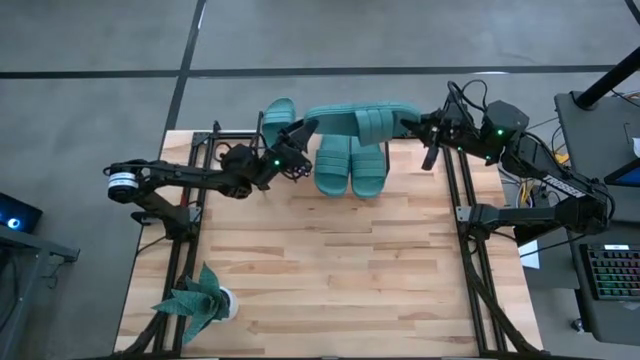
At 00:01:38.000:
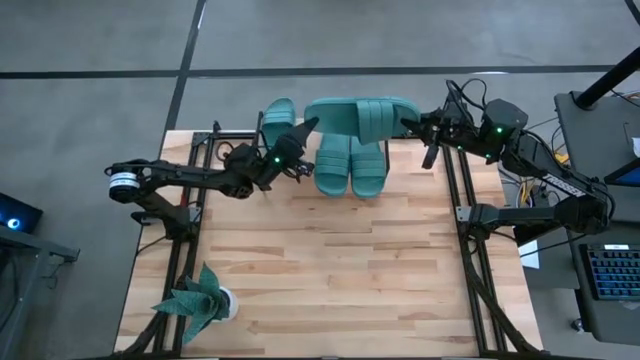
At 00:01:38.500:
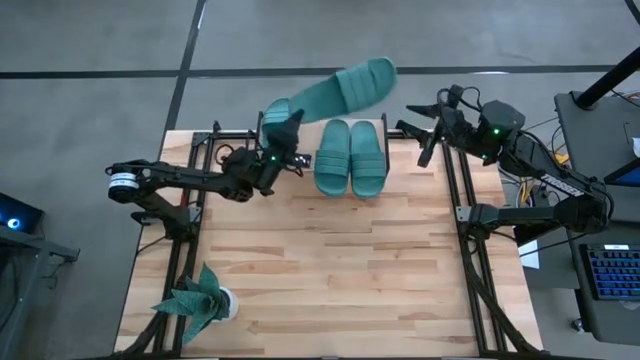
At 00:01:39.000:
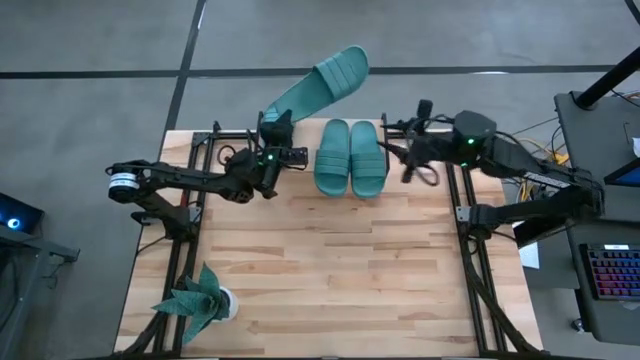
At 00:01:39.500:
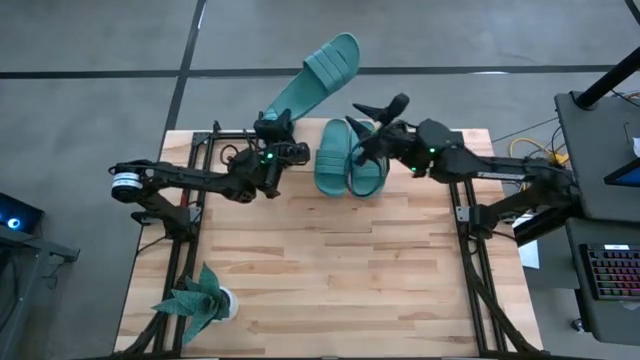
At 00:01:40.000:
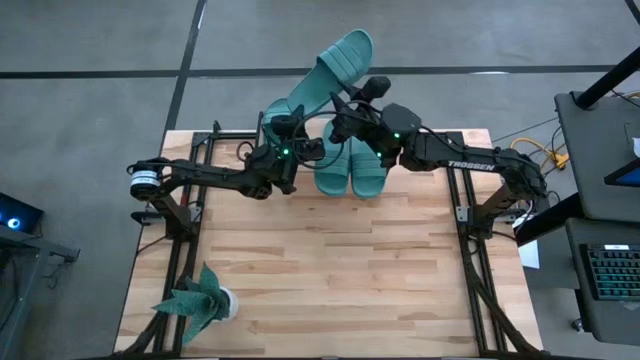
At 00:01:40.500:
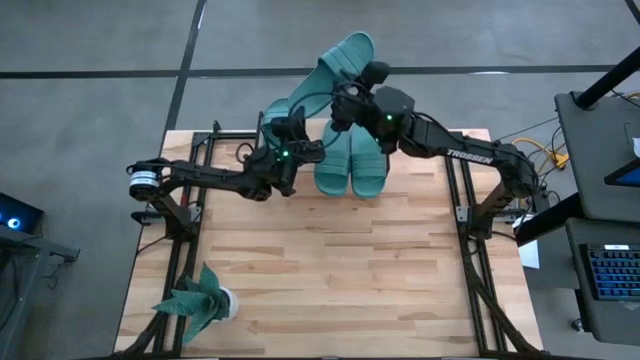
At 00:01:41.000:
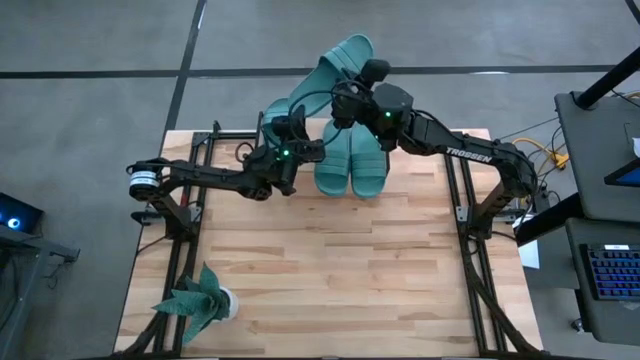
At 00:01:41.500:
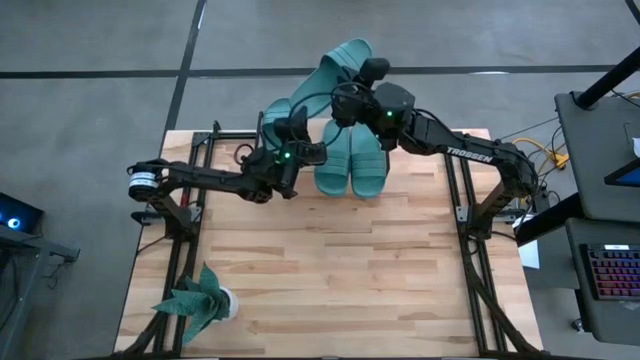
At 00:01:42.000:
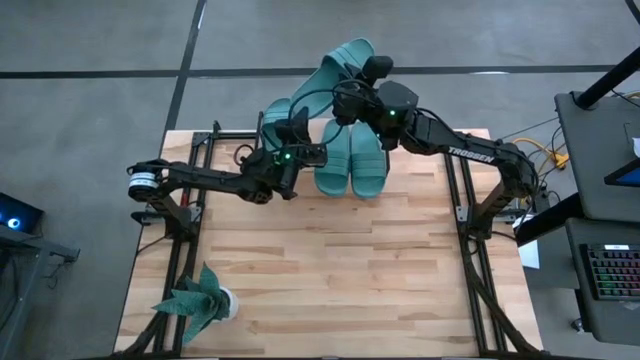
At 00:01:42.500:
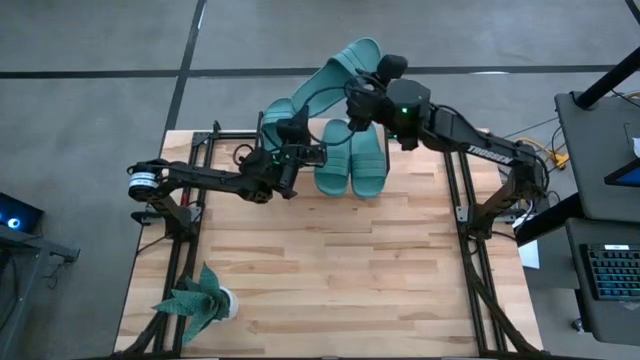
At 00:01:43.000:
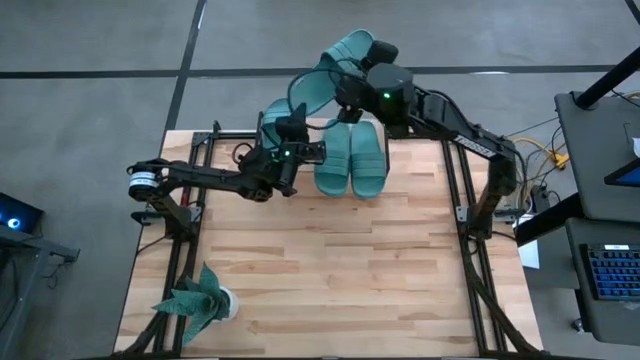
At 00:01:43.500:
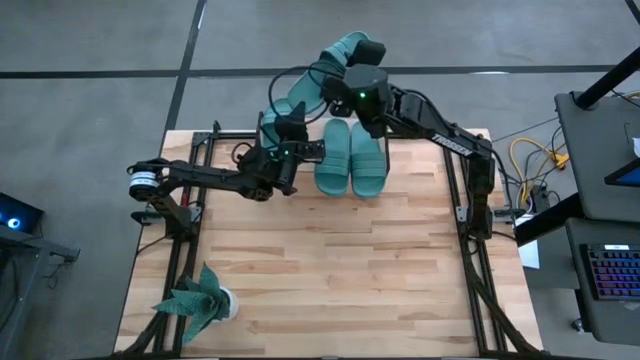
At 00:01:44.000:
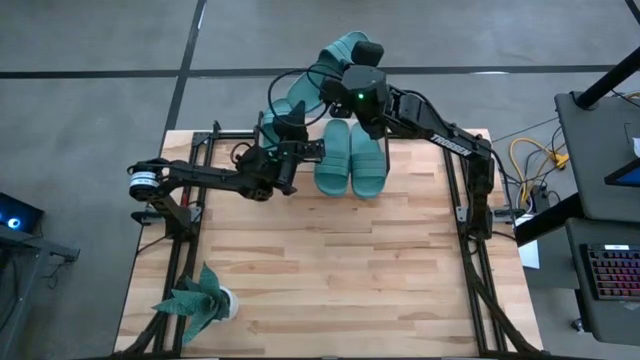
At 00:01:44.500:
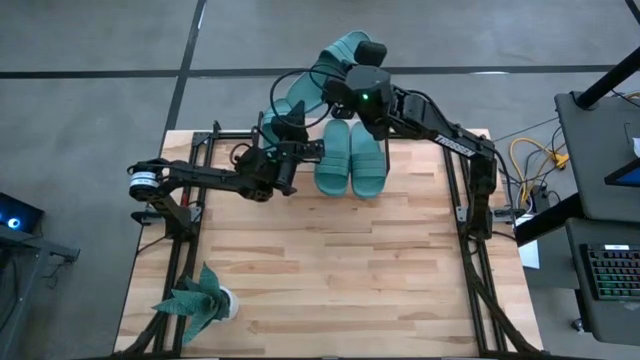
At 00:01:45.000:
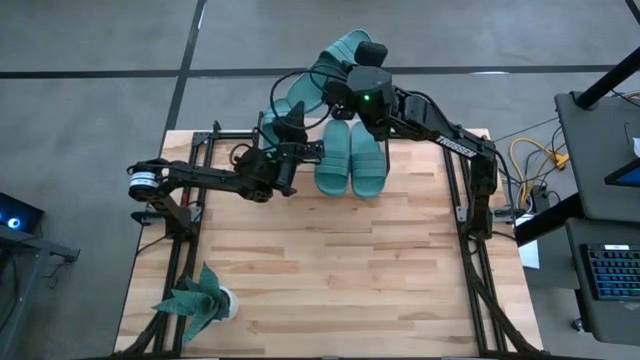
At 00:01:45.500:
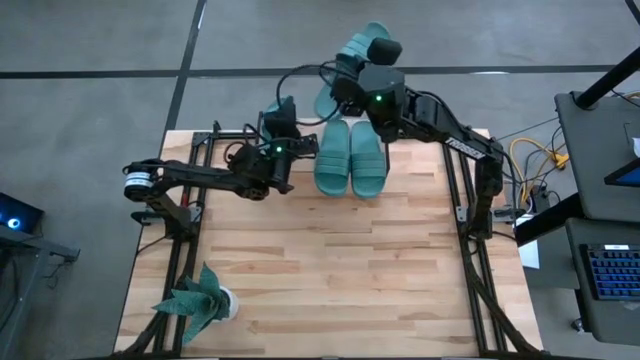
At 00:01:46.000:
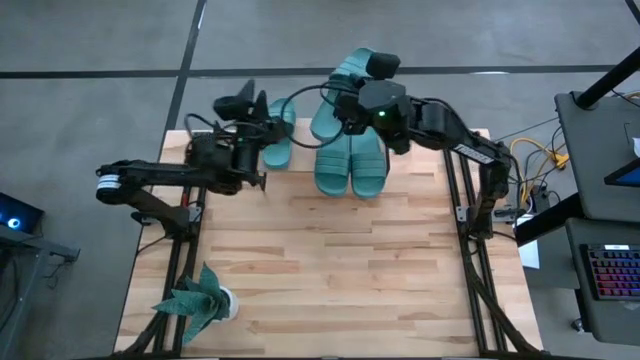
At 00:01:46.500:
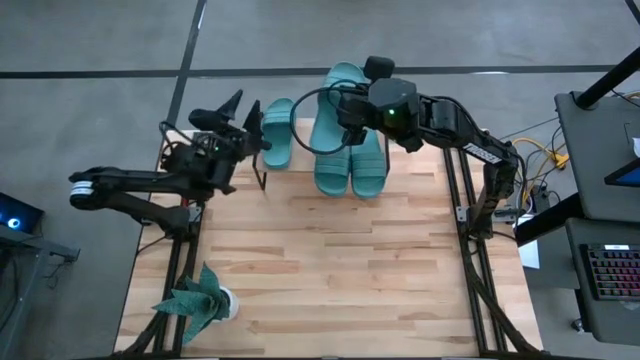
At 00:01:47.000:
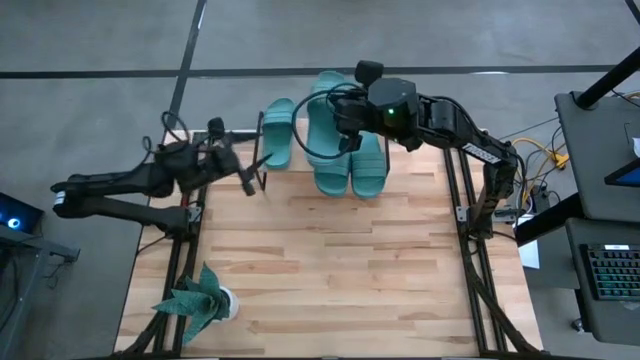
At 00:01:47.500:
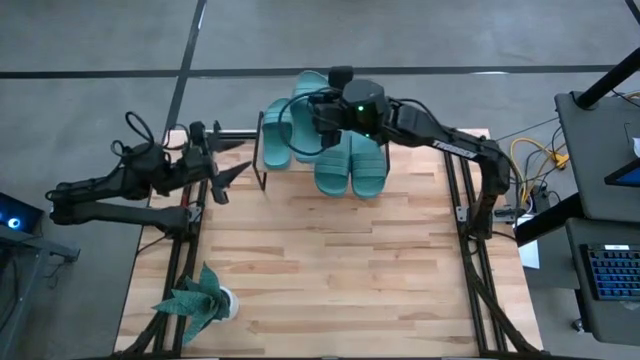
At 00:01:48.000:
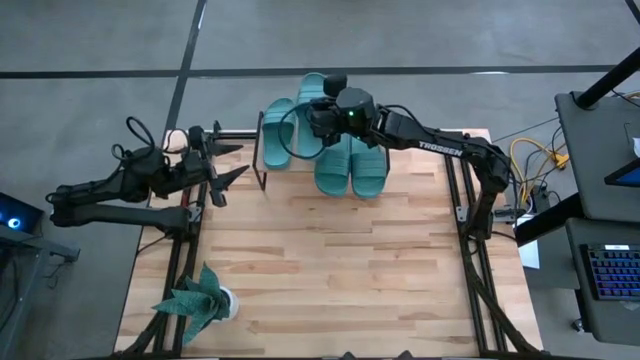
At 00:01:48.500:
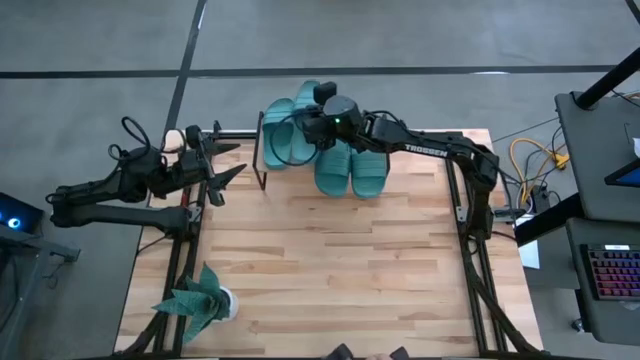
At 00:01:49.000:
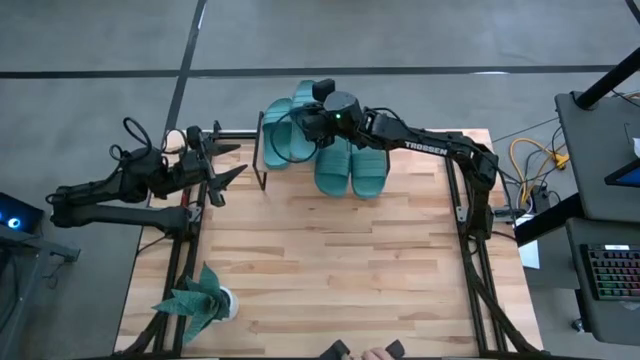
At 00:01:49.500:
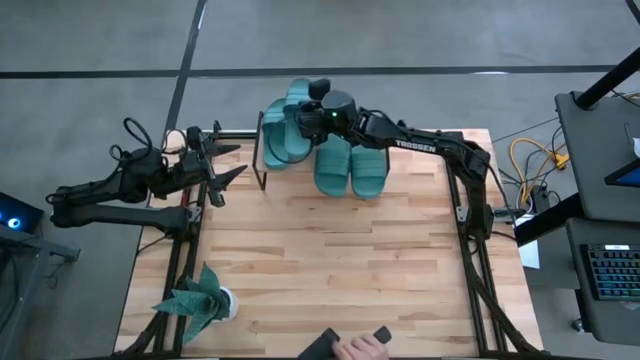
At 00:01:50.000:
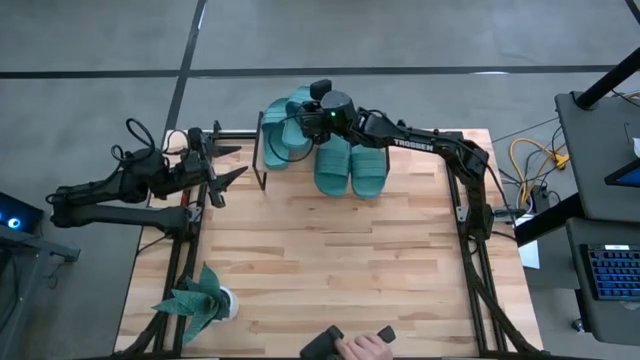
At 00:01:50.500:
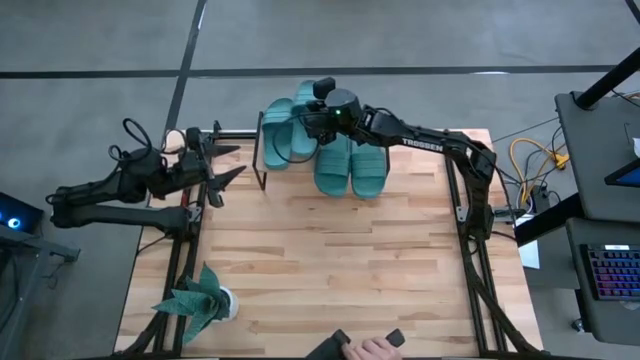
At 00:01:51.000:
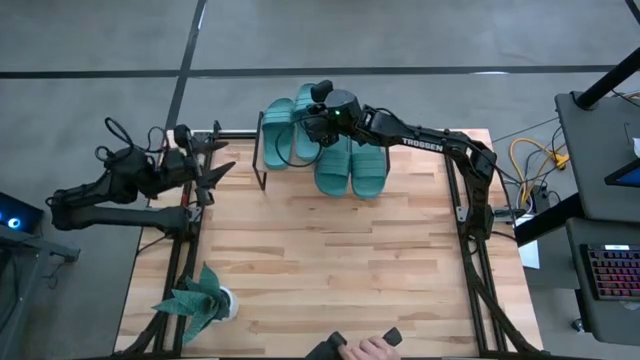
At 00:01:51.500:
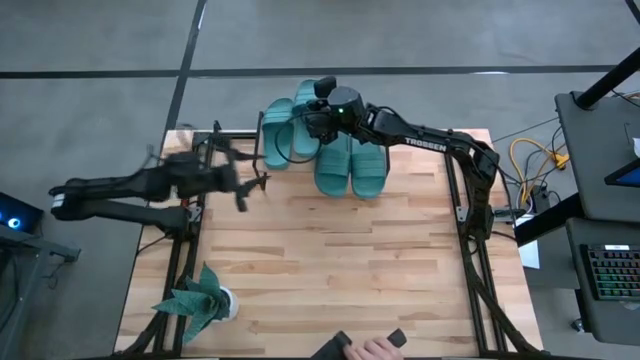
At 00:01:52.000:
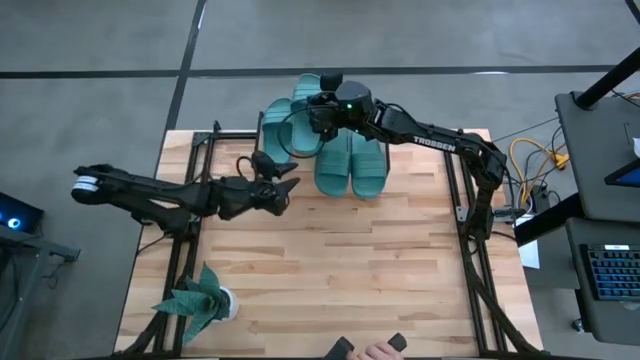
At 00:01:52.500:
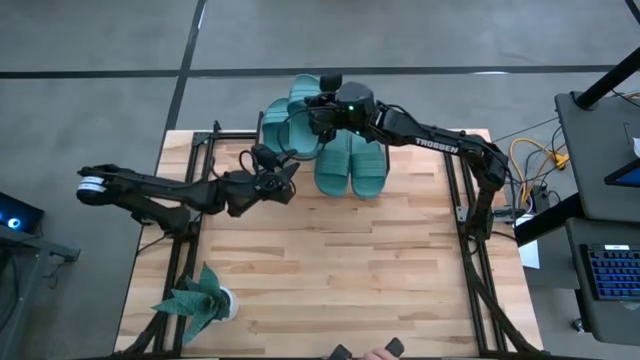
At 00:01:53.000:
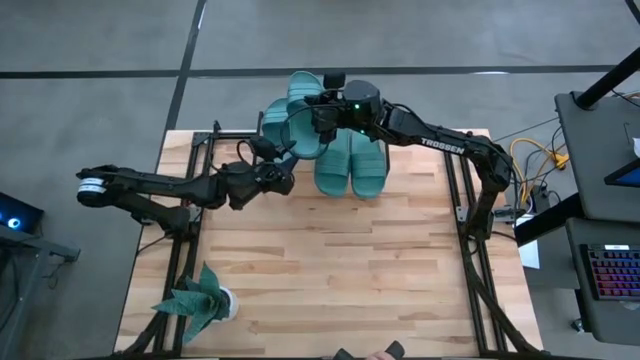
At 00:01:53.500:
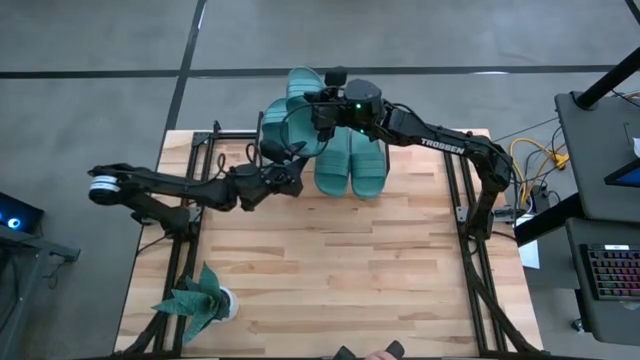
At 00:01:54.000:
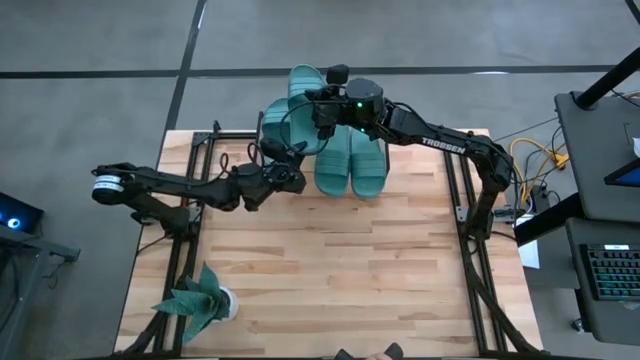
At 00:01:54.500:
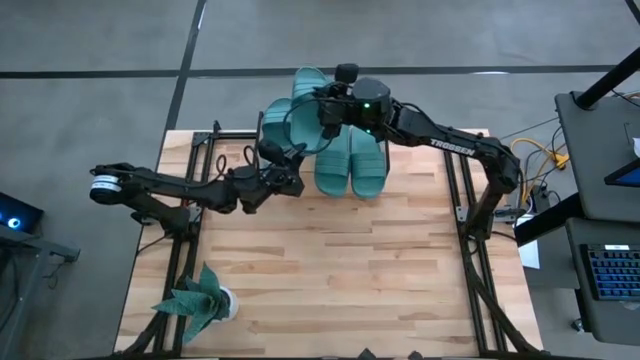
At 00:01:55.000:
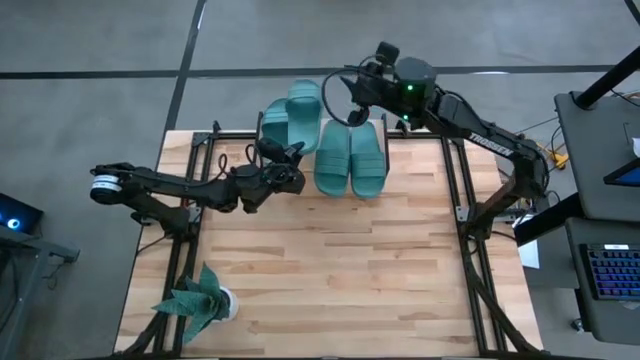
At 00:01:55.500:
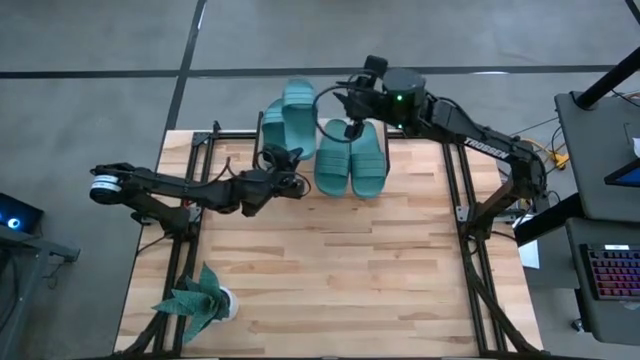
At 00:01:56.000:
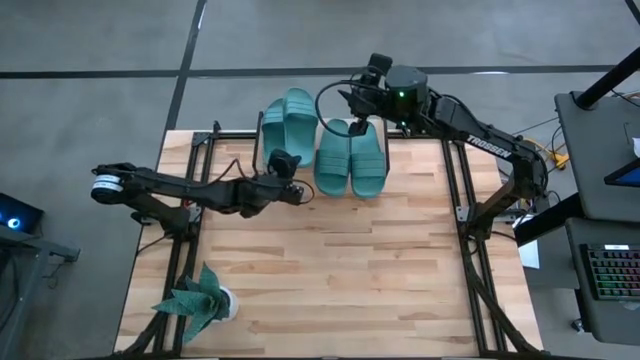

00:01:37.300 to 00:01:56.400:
Task: Pick and place slides into the shelf
Put the green slide on the shelf
